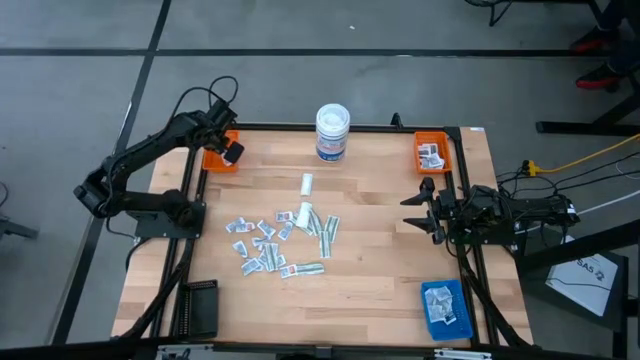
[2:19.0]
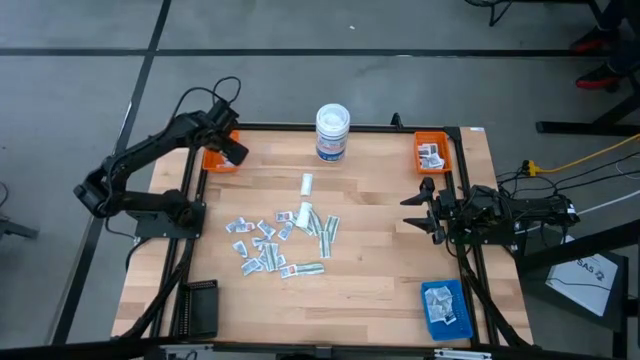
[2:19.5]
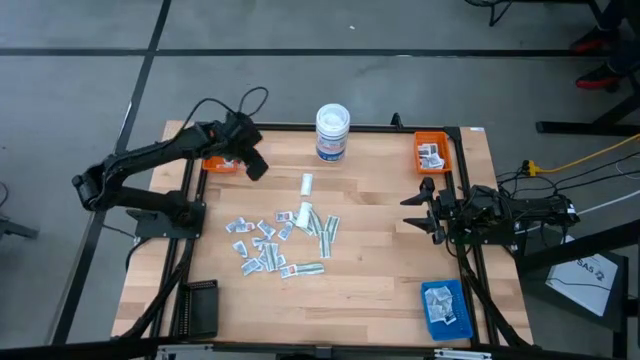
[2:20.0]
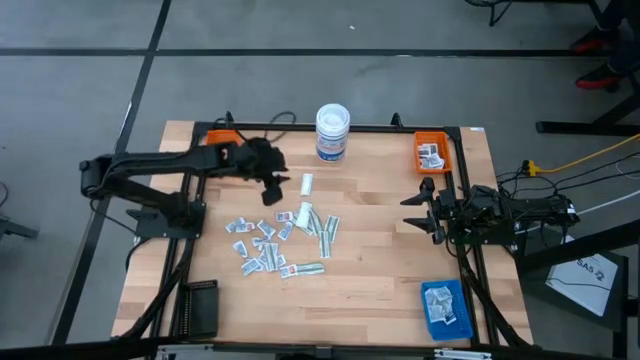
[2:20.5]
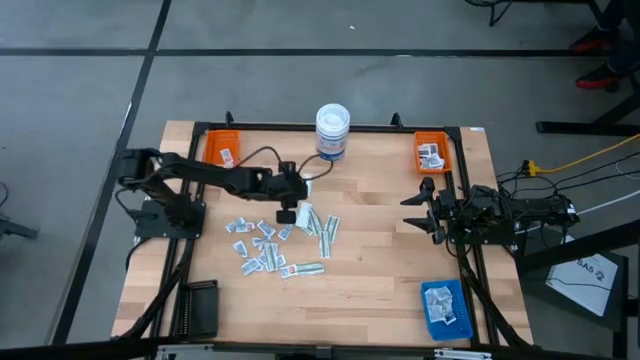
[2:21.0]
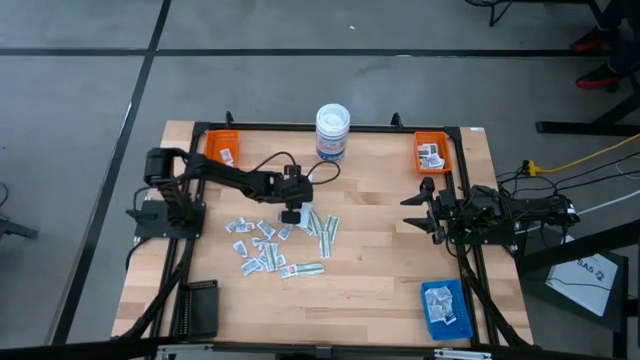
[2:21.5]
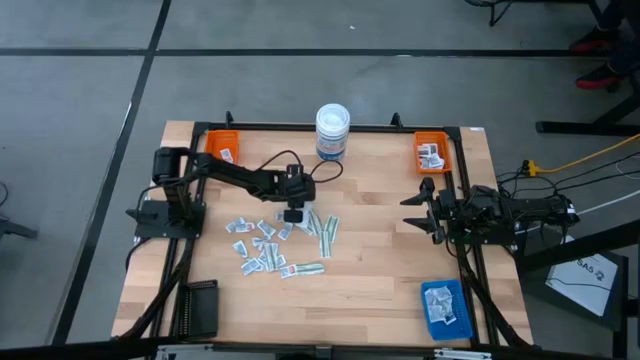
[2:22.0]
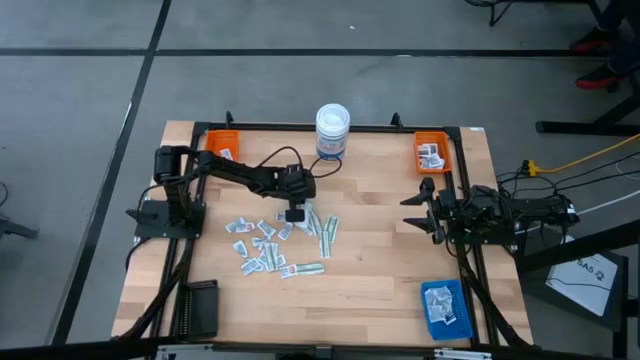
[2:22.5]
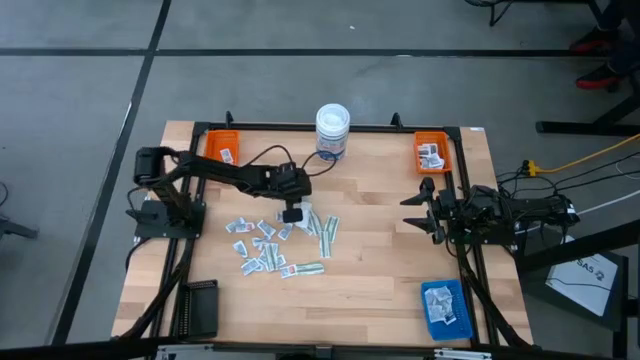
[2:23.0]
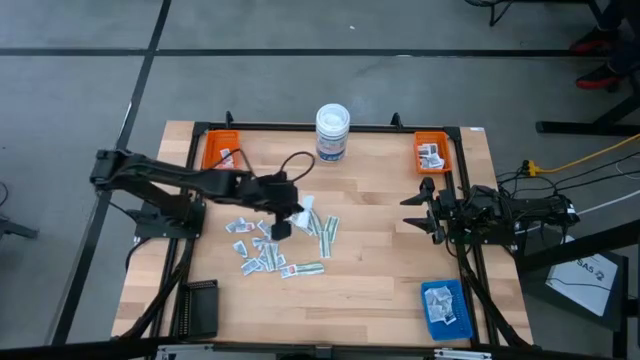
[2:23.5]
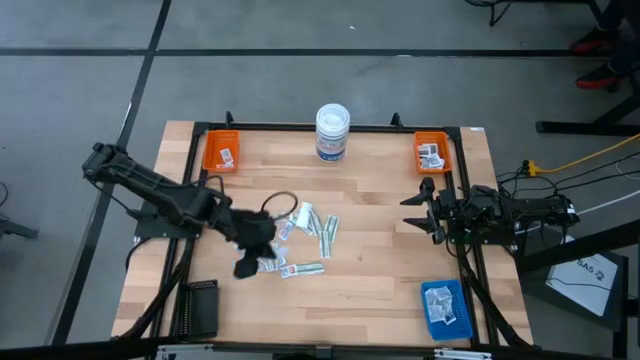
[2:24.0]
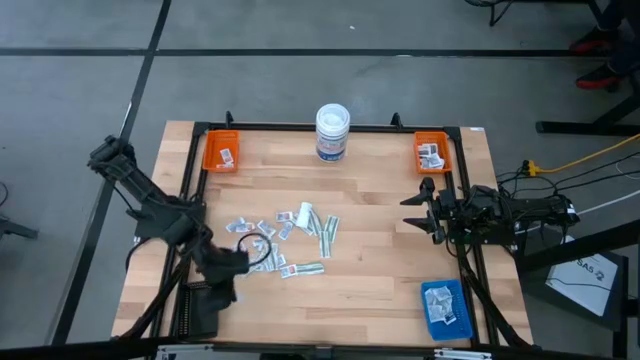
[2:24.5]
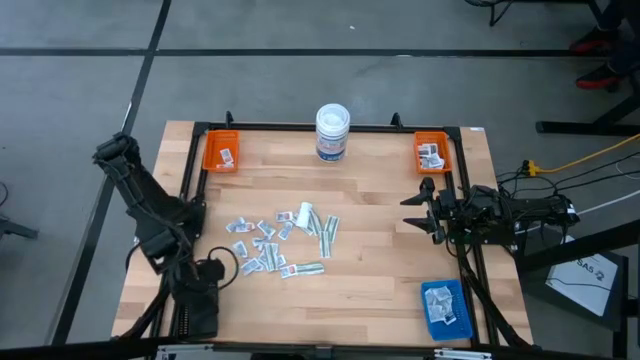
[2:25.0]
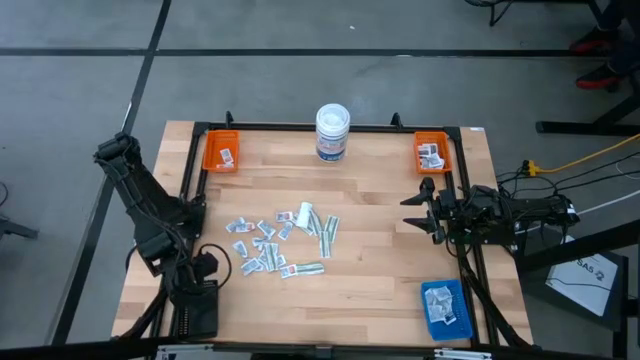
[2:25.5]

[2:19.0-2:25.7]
Task: Pick & Place First Aid Supplies
Put the green bandage pack into the black bin

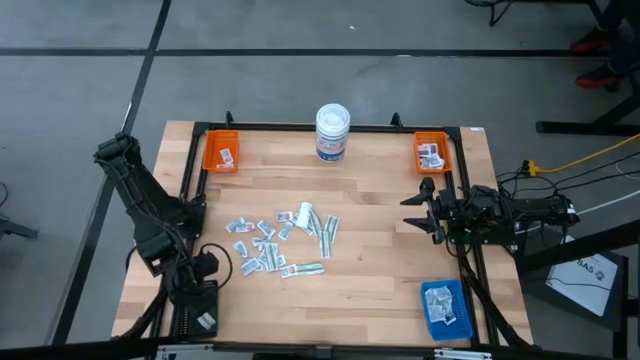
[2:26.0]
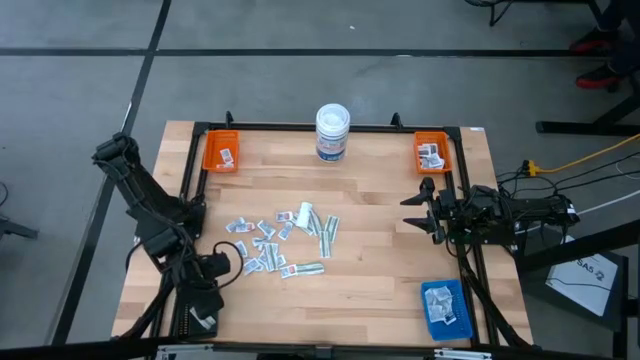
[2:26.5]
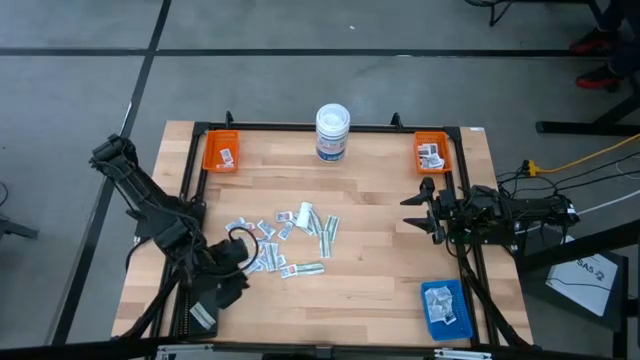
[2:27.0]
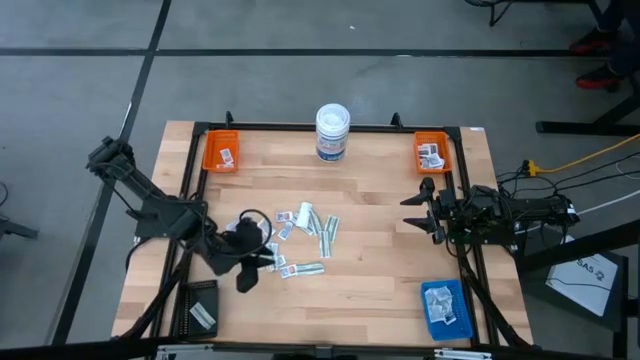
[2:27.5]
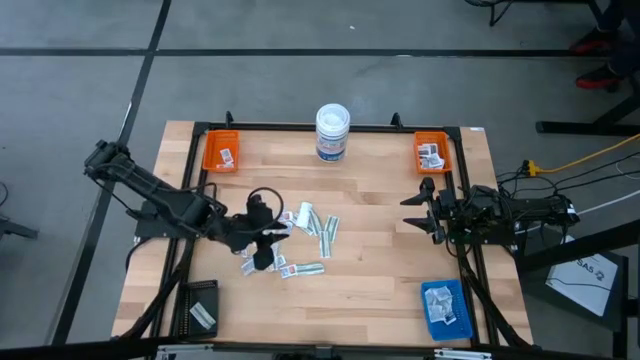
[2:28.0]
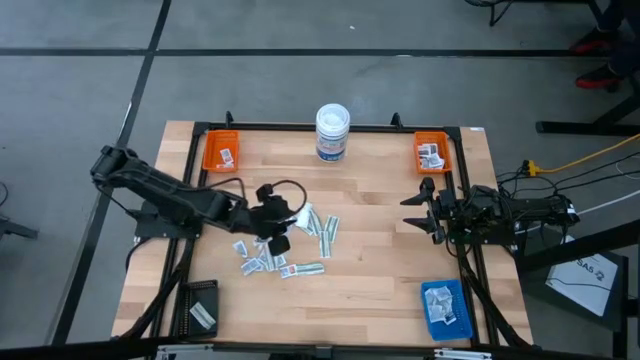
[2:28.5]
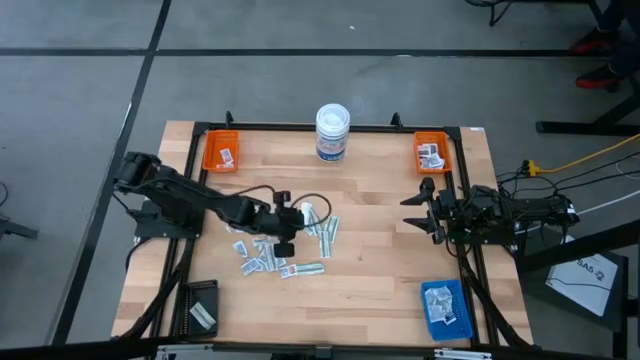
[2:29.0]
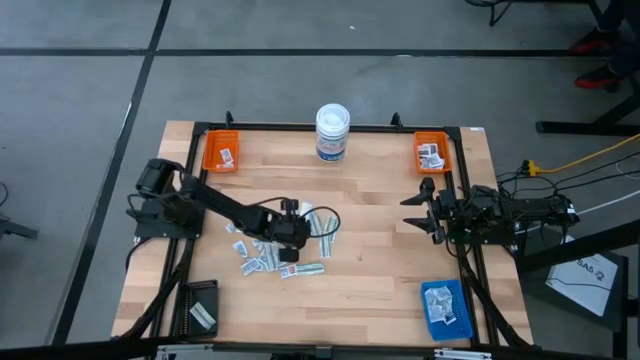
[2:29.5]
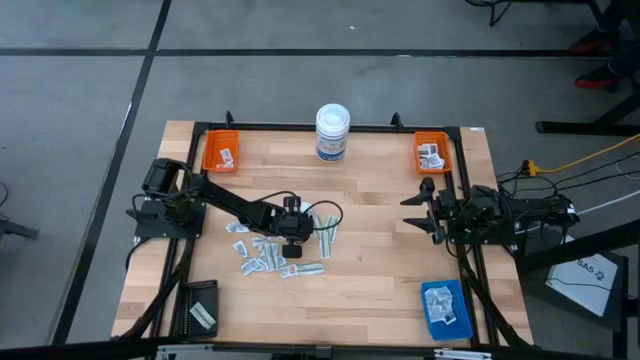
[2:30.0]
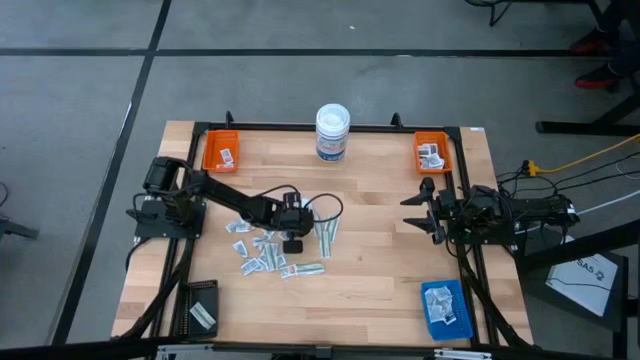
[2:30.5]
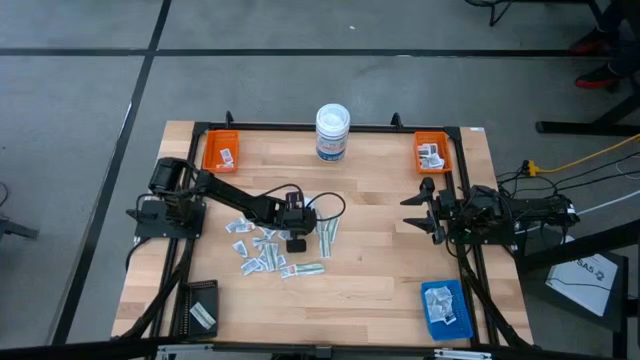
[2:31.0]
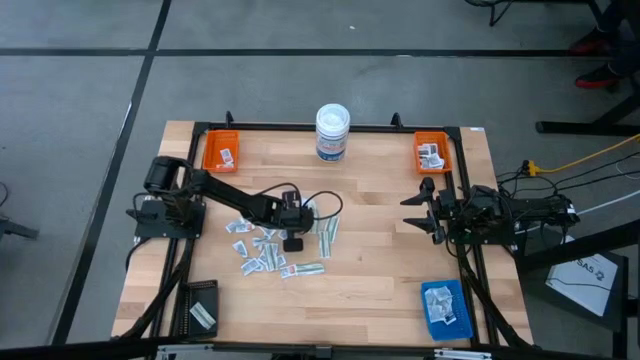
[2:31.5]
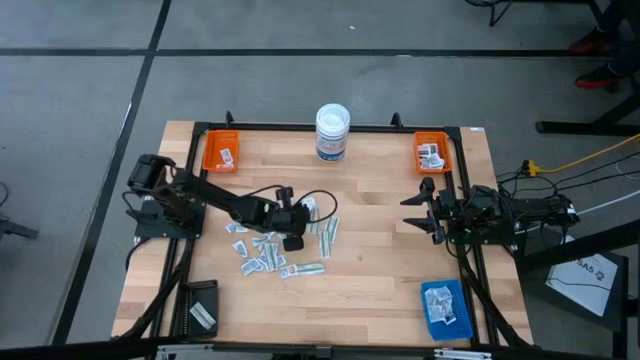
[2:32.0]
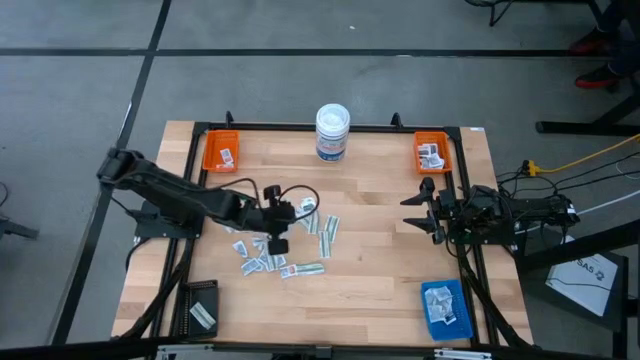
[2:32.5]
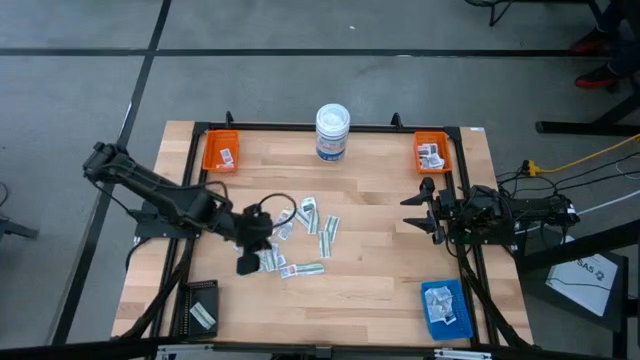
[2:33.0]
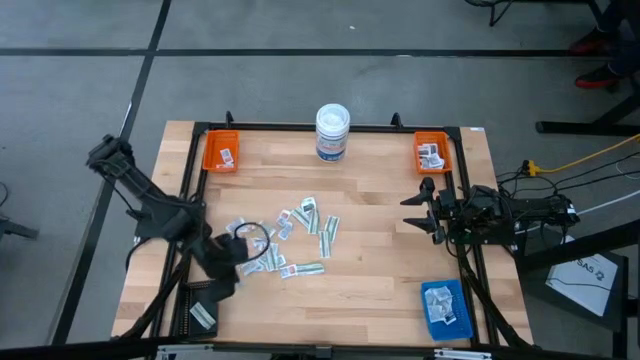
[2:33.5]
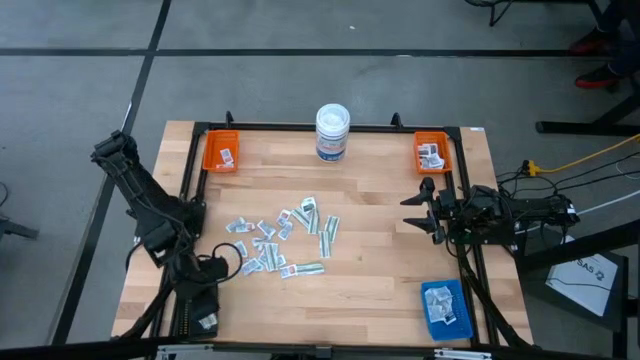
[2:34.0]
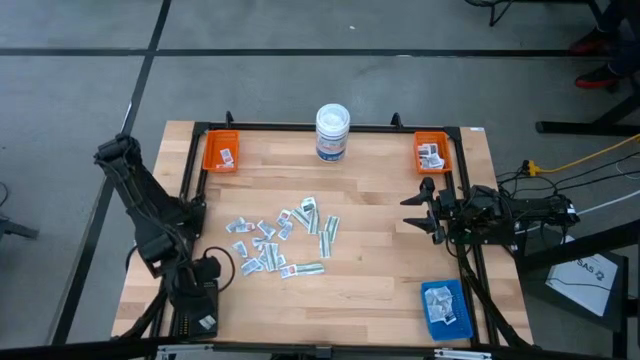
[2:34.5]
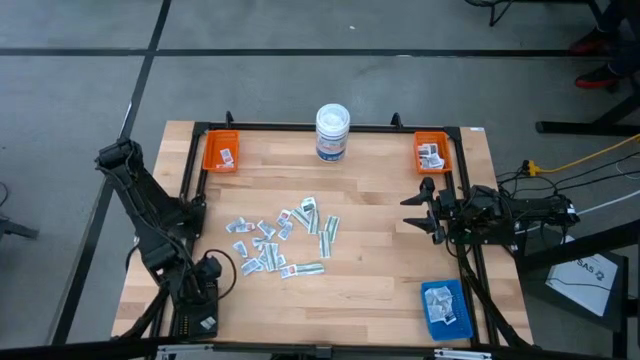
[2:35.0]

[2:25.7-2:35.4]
Put the green bandage pack into the black bin

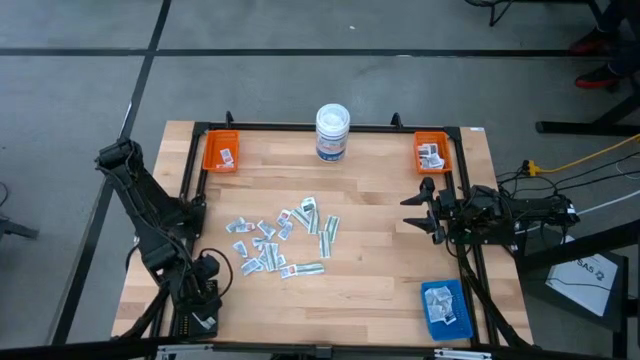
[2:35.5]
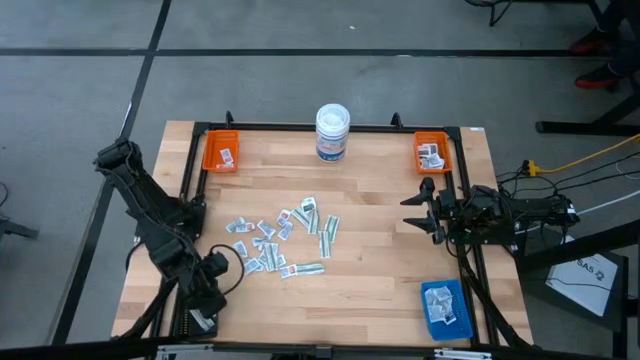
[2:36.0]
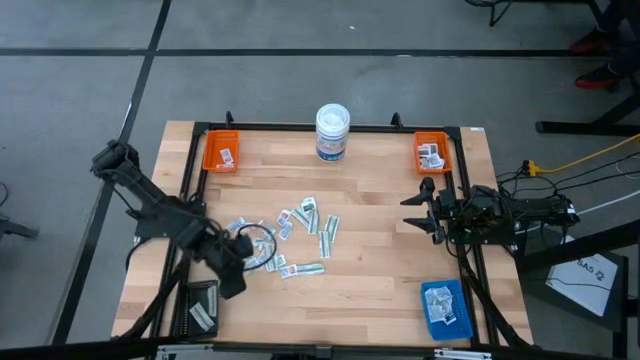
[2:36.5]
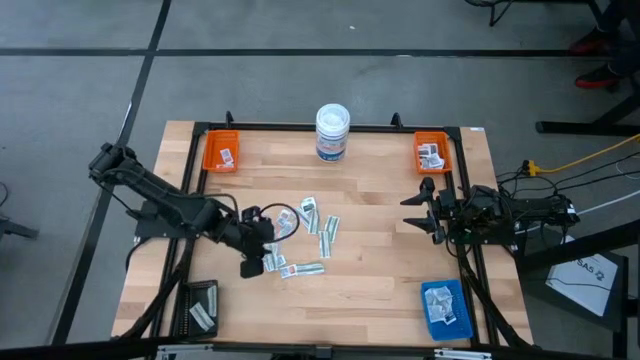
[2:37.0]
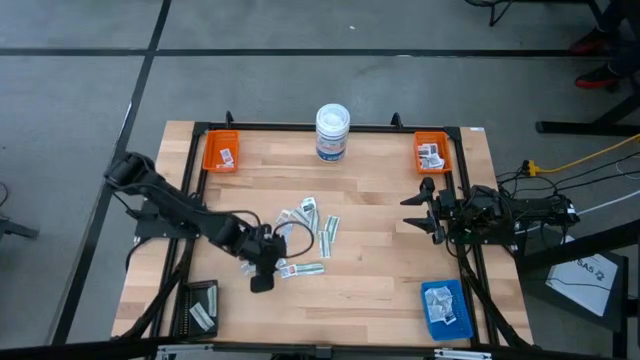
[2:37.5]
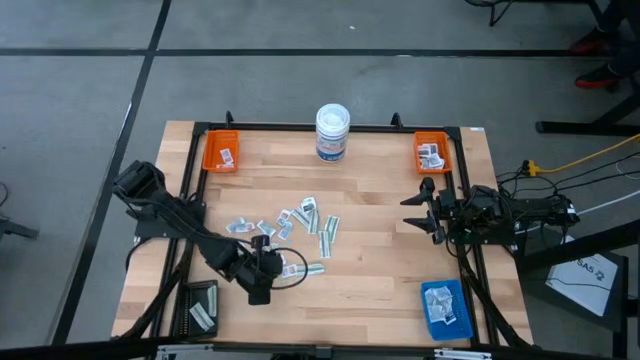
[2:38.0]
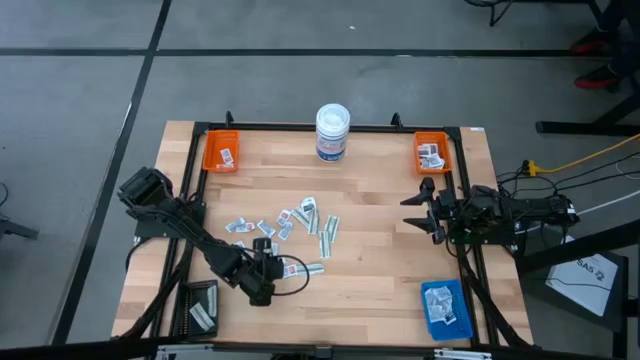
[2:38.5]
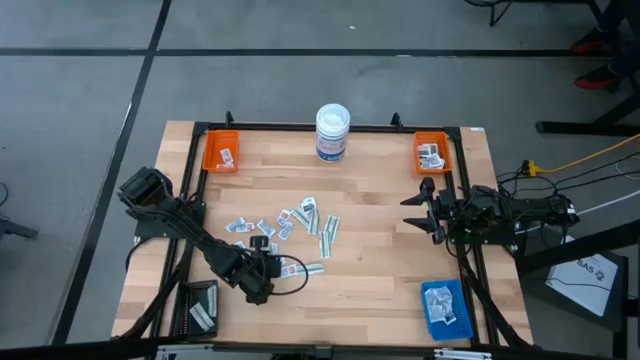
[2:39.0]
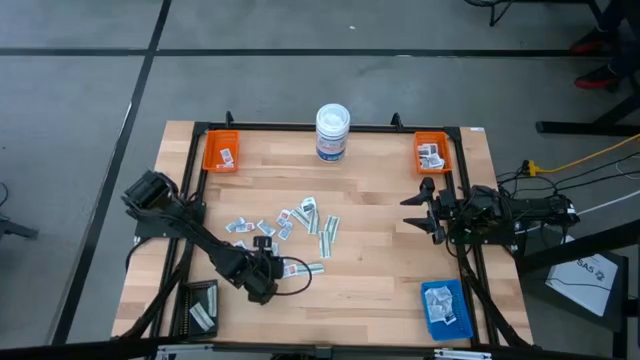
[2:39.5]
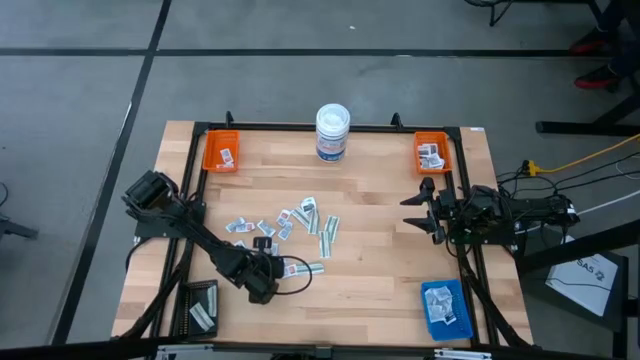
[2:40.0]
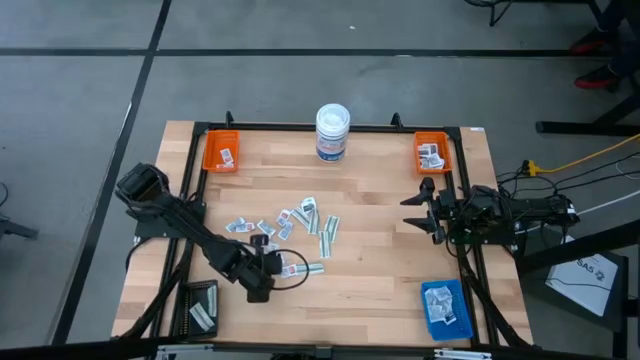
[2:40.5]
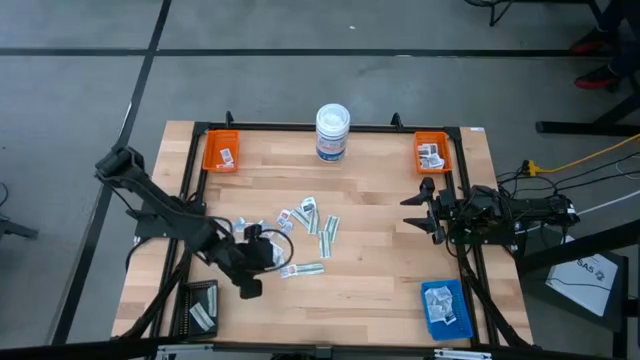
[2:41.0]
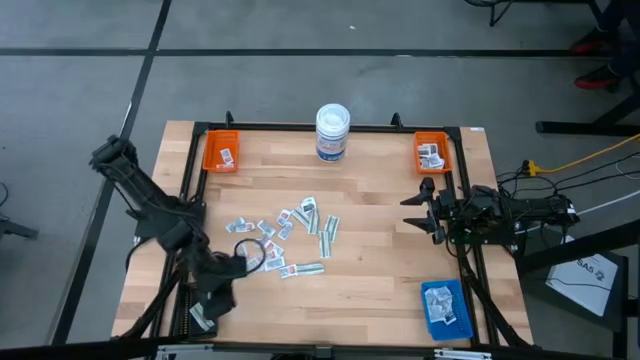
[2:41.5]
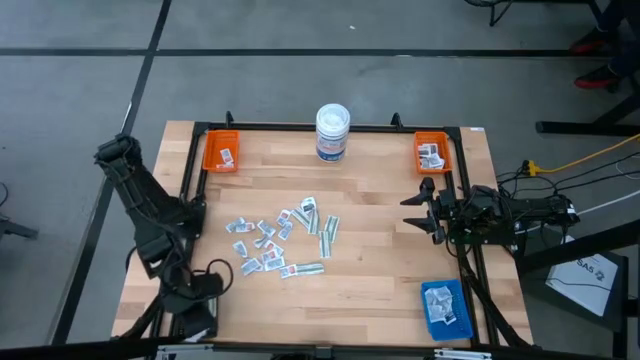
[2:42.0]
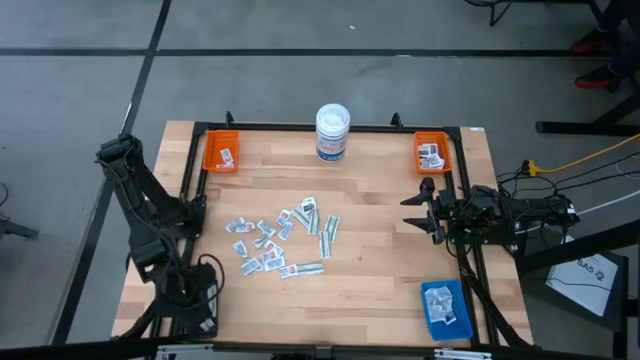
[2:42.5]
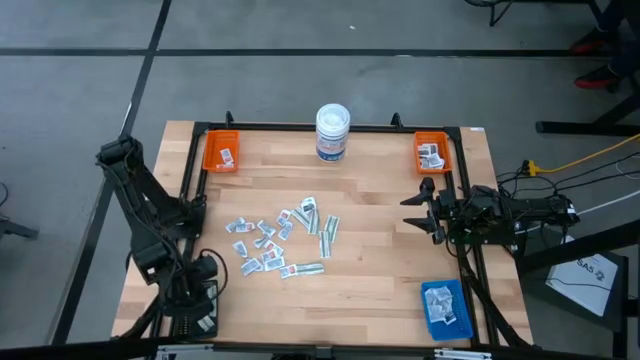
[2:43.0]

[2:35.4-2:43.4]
Put the green bandage pack into the black bin
